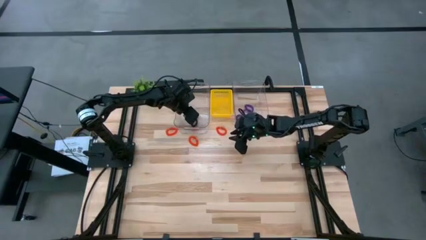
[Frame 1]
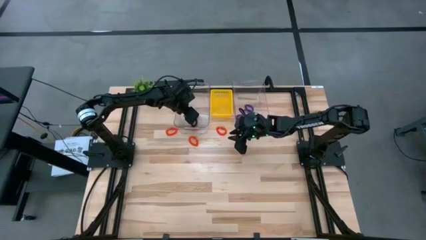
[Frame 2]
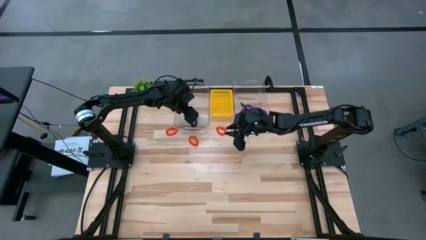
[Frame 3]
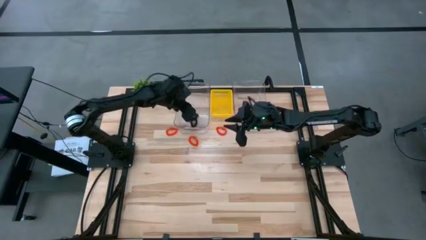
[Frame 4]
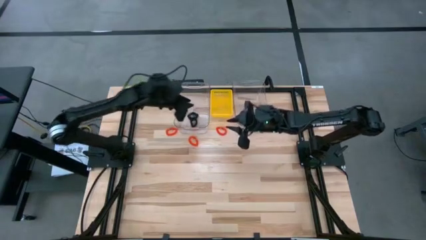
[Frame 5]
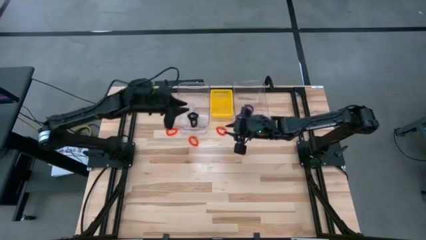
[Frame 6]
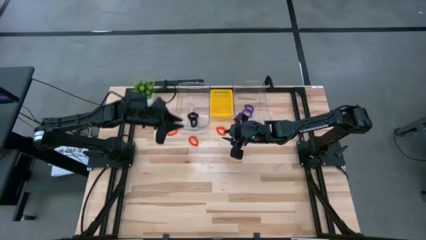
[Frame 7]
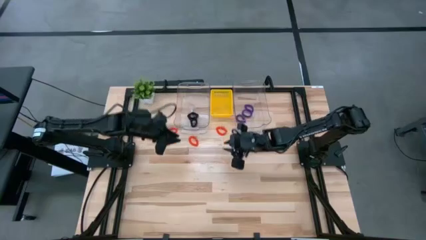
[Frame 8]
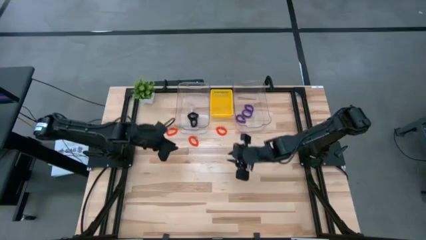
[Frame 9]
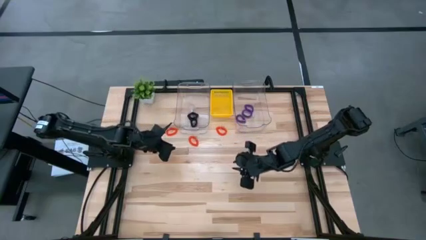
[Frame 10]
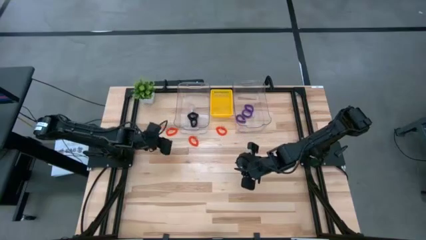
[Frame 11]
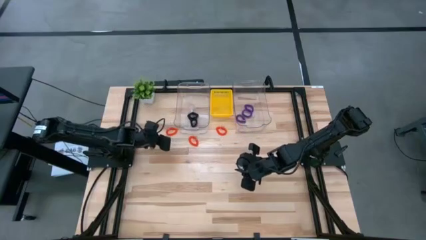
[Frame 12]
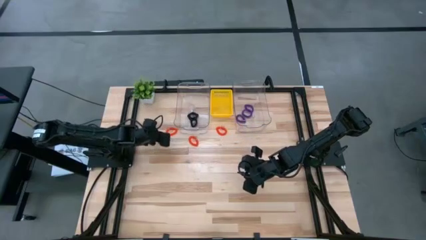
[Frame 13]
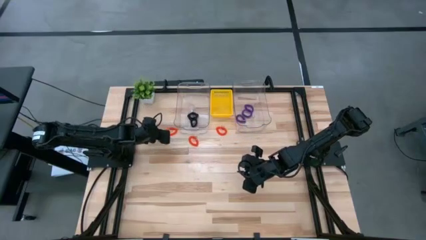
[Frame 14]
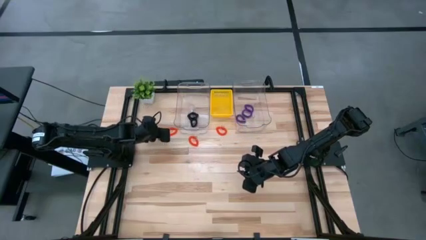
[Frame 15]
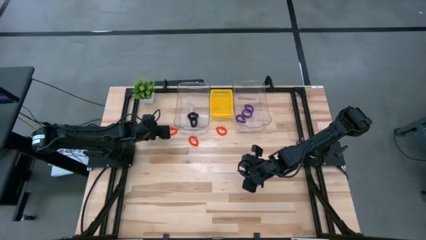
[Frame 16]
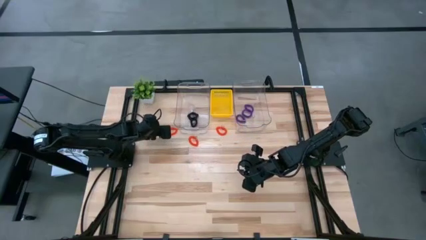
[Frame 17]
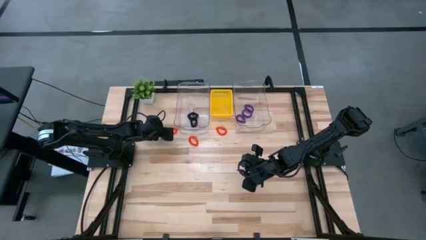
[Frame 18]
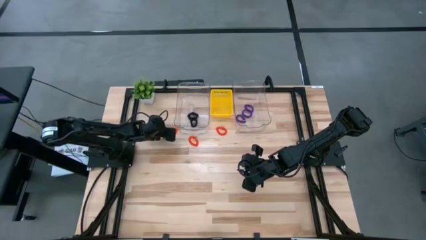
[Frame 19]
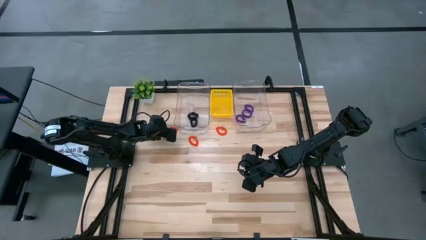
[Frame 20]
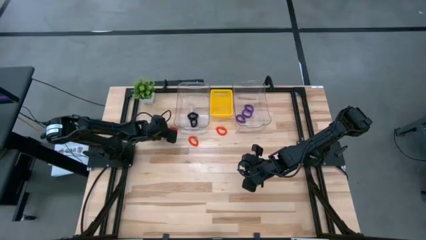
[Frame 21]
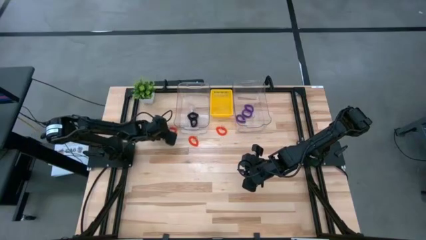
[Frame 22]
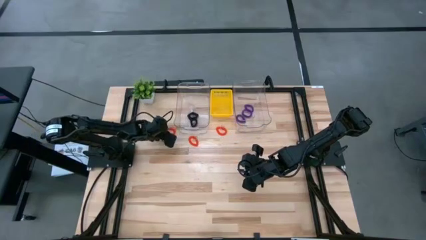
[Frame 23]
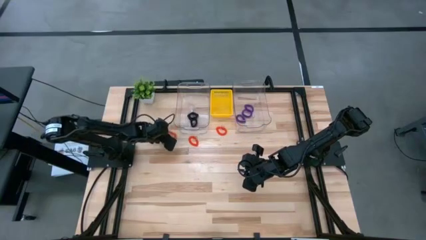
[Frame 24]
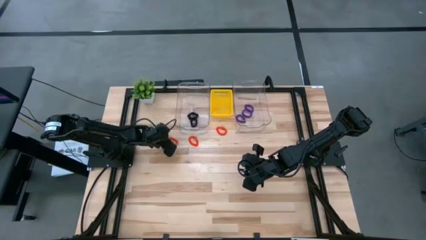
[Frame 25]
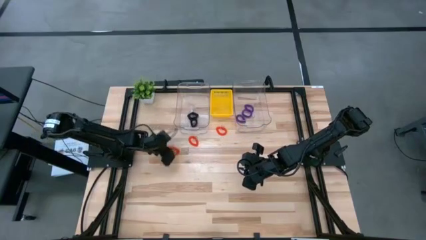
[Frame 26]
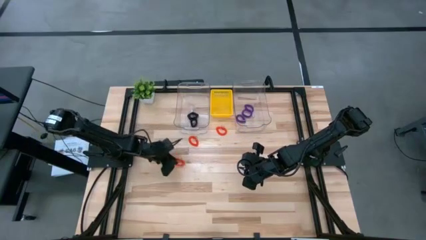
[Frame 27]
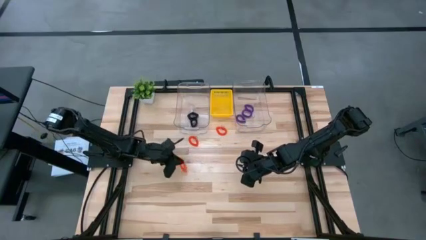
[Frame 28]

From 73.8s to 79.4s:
Task: Sort spring keychains
Put the left orange spring keychain into the yellow bin

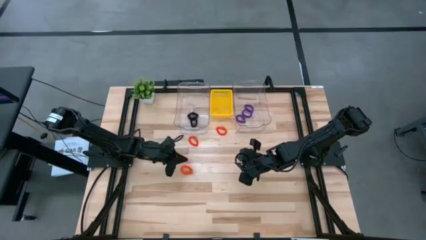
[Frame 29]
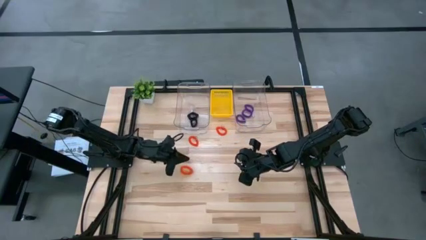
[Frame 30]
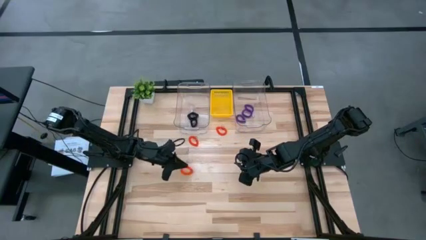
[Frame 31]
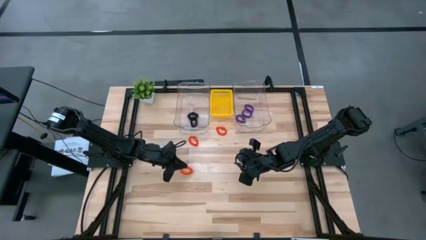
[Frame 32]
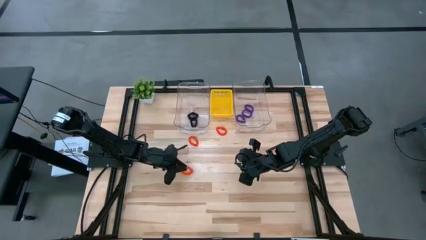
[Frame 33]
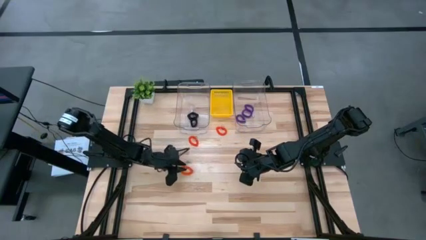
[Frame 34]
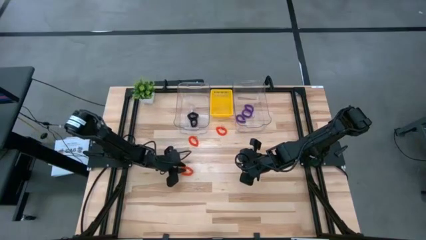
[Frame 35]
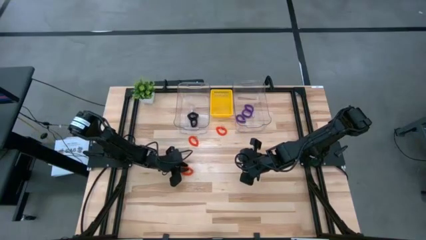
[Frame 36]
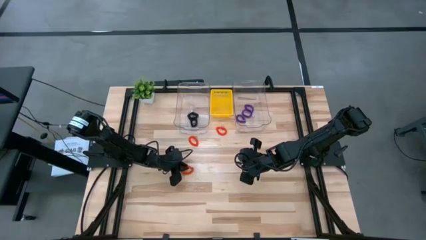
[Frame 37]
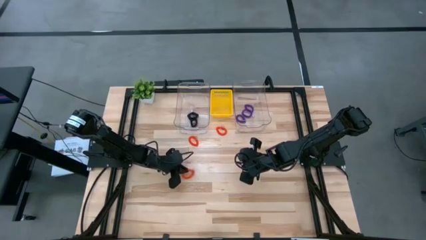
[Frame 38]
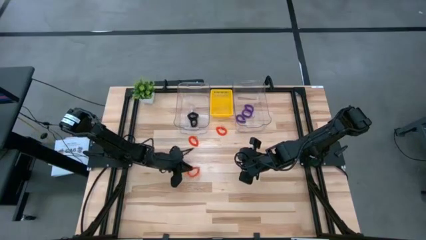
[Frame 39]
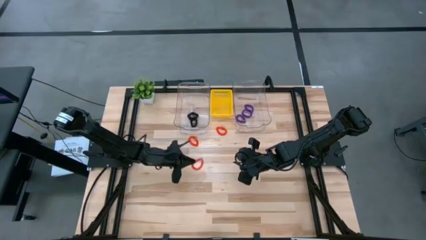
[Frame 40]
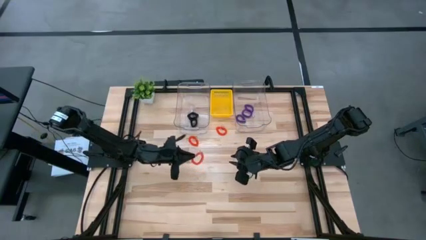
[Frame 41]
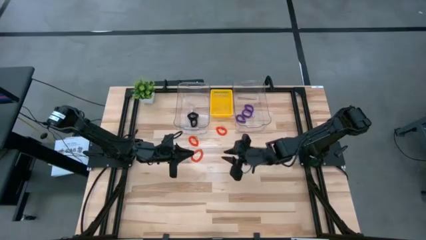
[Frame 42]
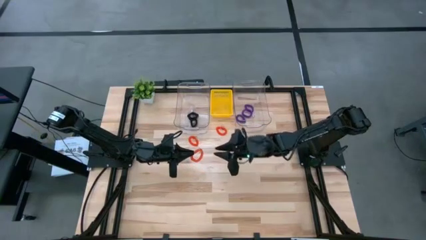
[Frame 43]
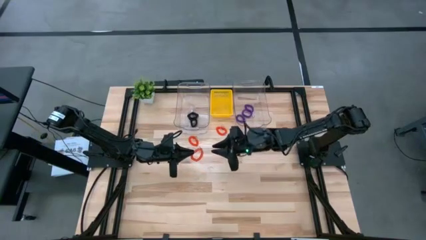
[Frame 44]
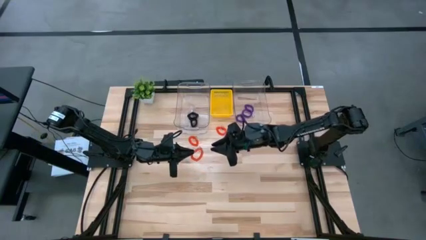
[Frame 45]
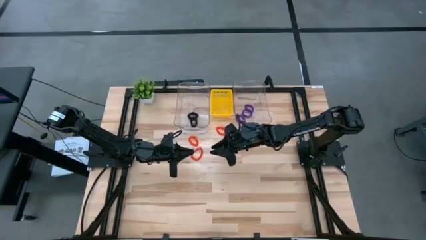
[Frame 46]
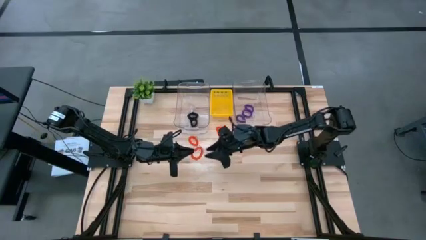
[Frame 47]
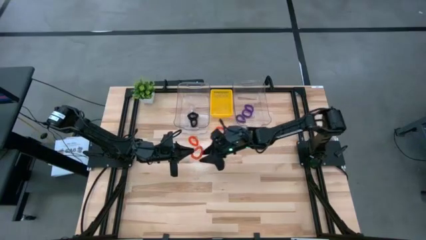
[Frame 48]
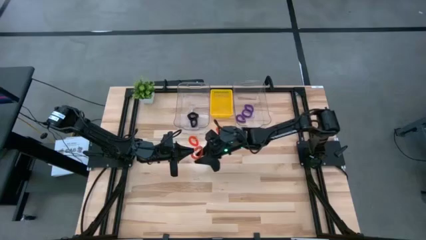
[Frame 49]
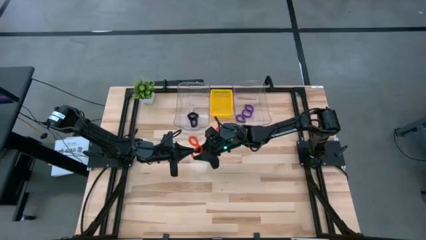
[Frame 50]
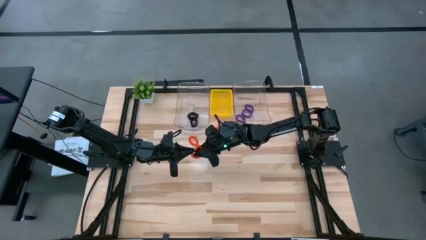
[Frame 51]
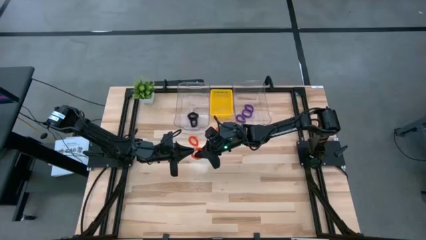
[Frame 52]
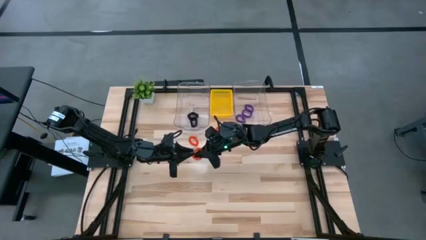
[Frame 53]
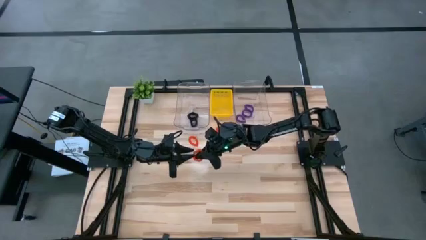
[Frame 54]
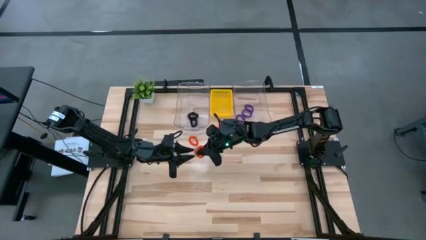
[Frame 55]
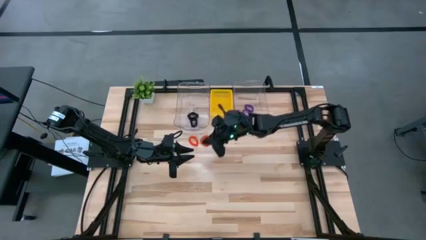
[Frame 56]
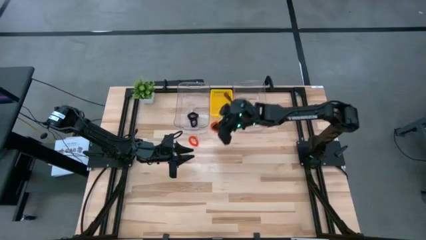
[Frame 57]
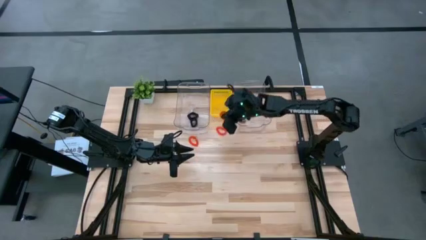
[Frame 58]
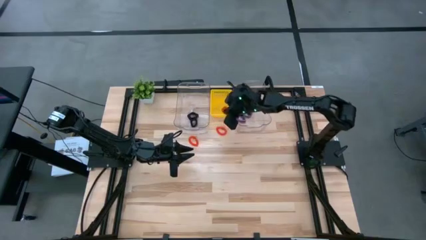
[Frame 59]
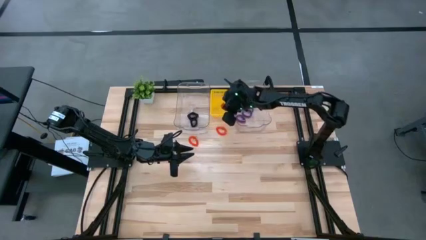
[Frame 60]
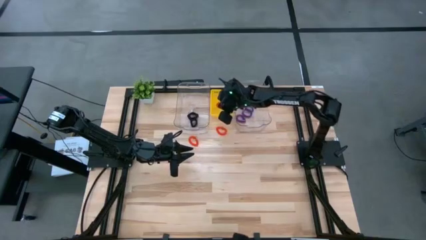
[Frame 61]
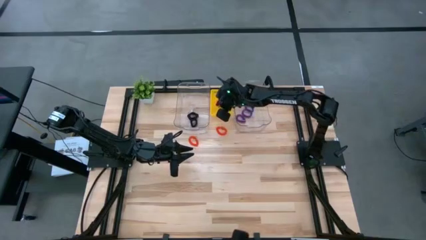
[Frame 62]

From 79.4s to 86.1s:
Put the bottom orange spring keychain into the yellow bin

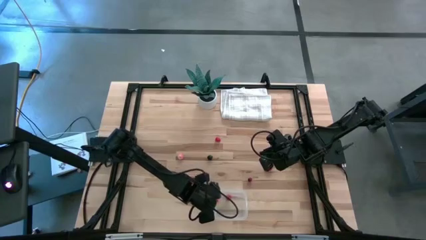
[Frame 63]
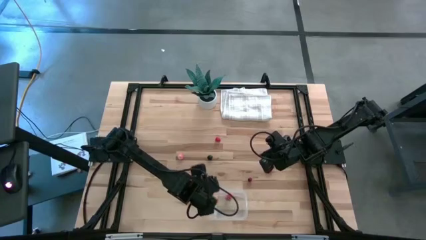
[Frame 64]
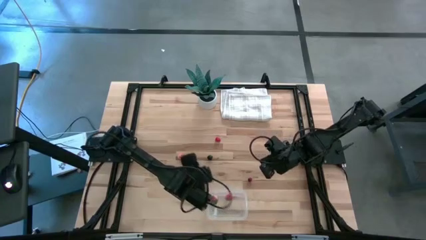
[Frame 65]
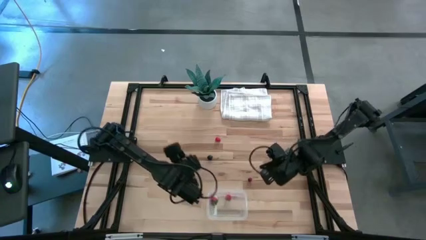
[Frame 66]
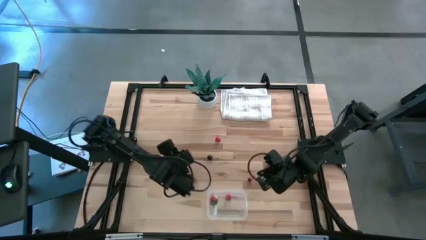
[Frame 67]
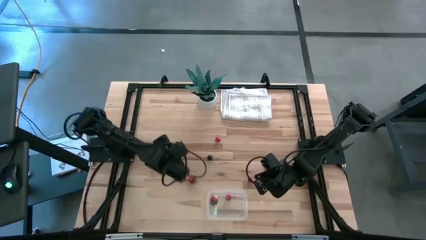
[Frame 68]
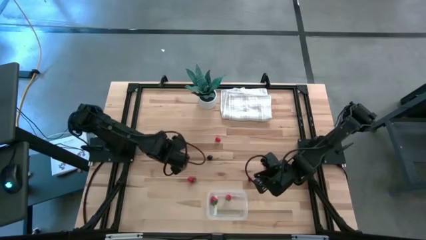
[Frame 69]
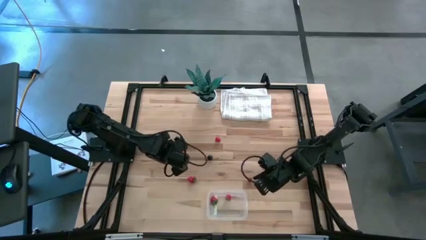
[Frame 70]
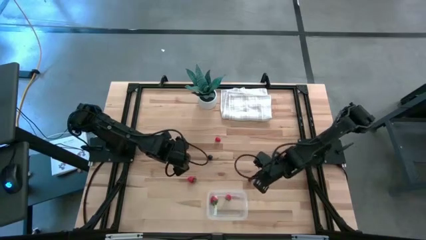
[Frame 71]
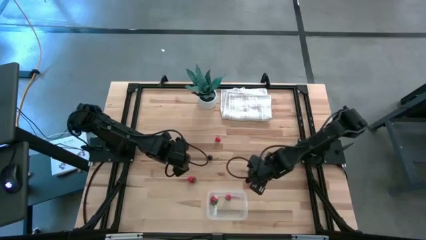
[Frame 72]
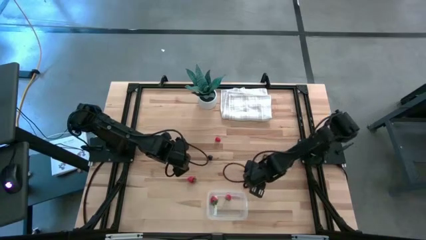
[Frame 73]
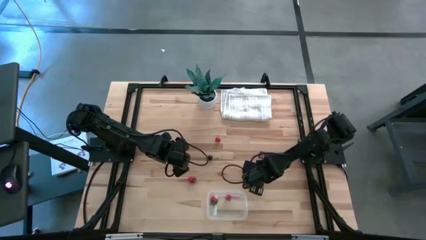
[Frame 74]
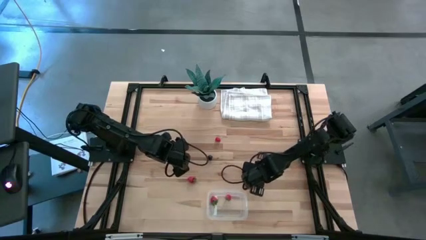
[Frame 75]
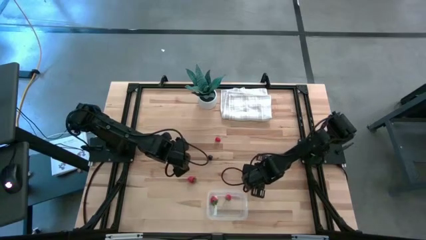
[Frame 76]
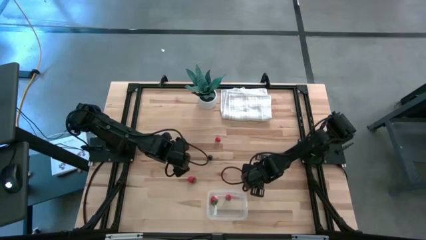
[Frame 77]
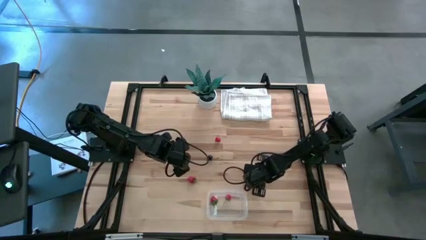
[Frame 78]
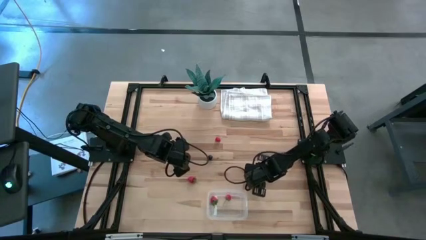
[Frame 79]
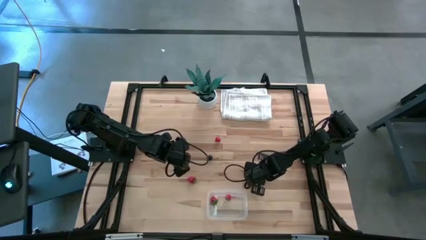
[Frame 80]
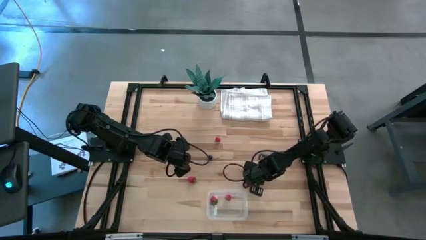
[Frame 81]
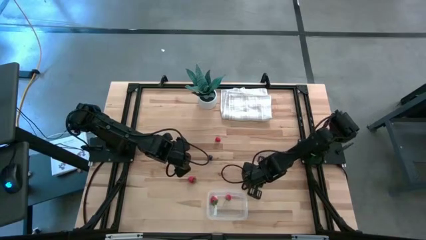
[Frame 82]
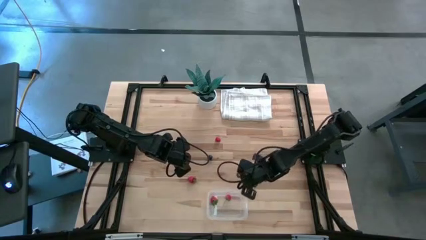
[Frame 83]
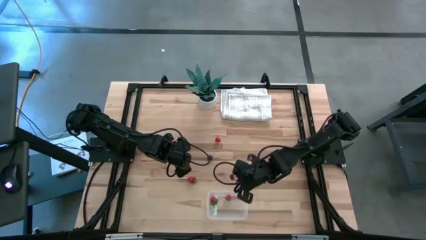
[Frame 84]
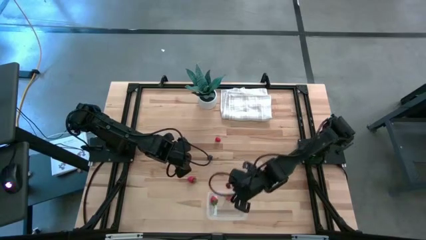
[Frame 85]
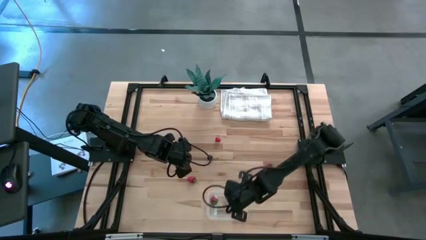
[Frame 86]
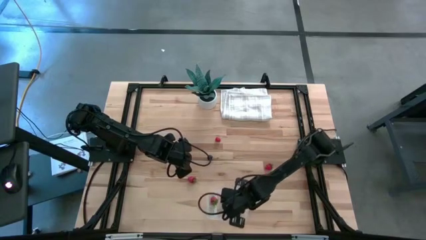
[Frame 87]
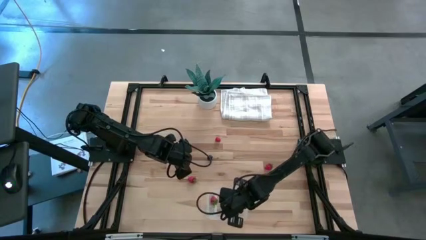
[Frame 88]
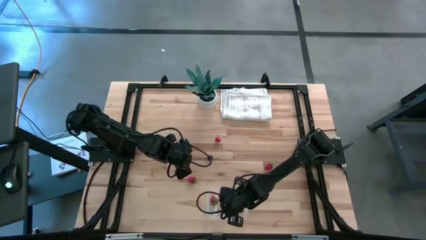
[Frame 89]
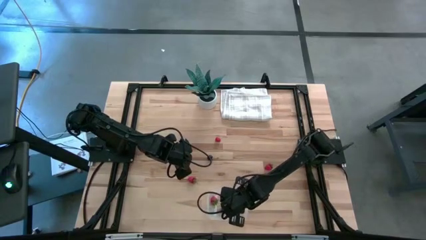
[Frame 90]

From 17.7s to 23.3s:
Task: Pick and placing Produce into tupperware
Put the red cherry into the transparent bin
